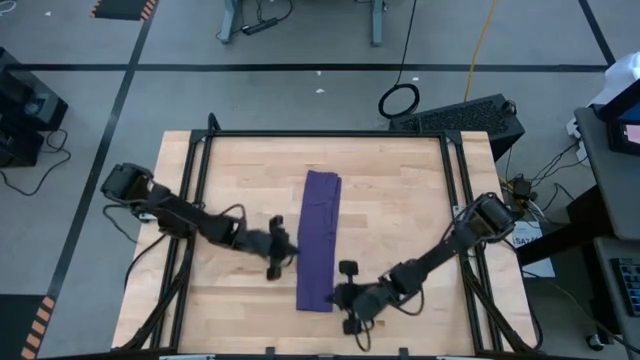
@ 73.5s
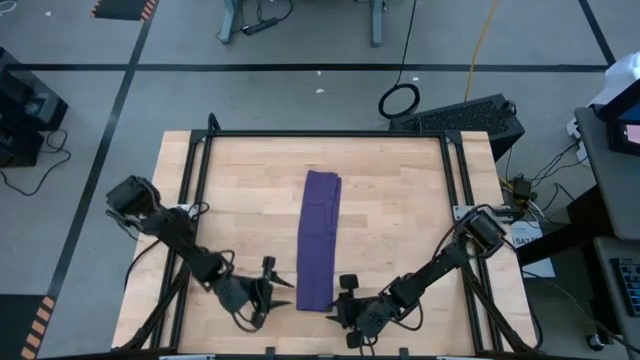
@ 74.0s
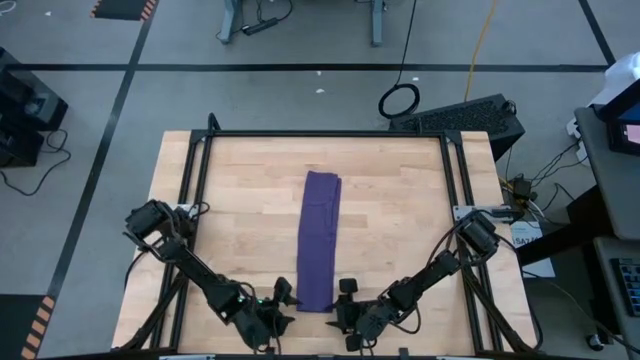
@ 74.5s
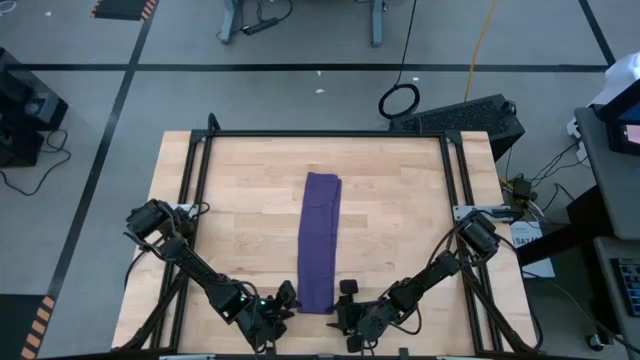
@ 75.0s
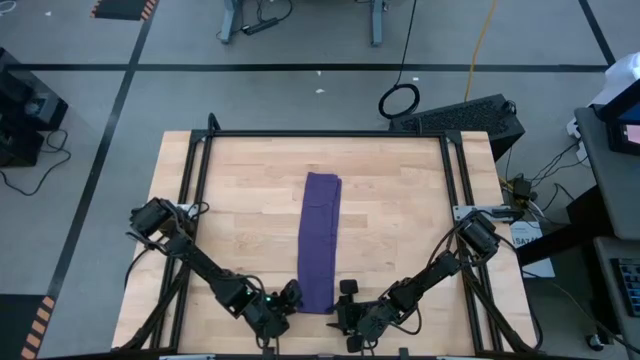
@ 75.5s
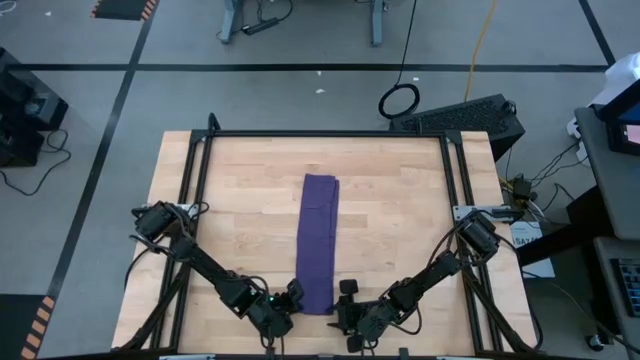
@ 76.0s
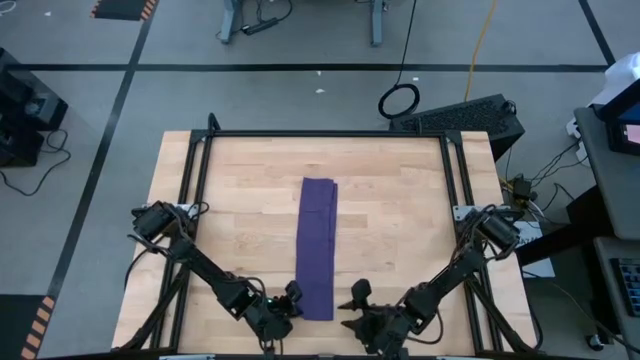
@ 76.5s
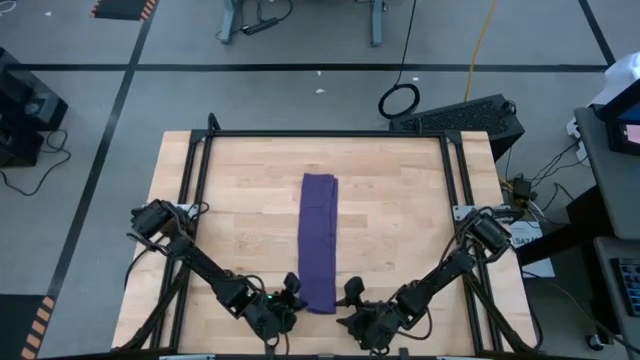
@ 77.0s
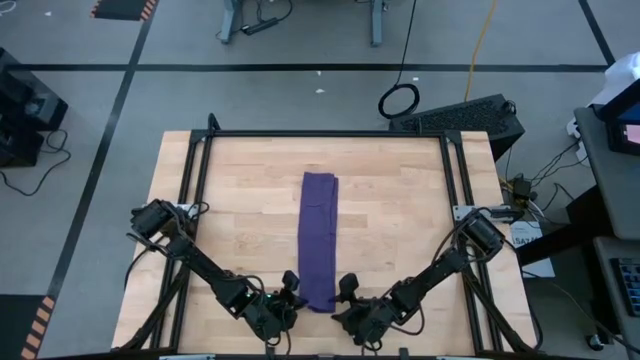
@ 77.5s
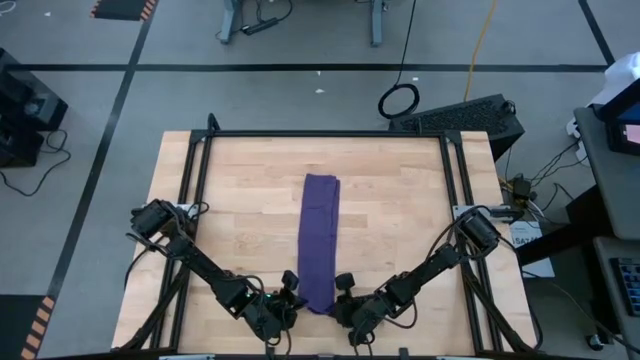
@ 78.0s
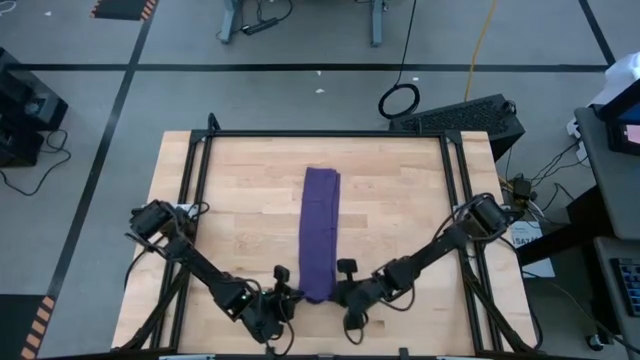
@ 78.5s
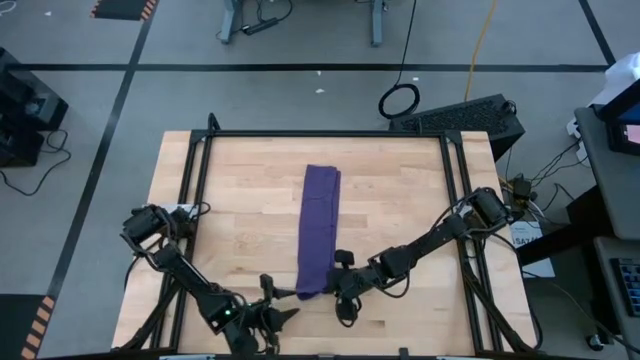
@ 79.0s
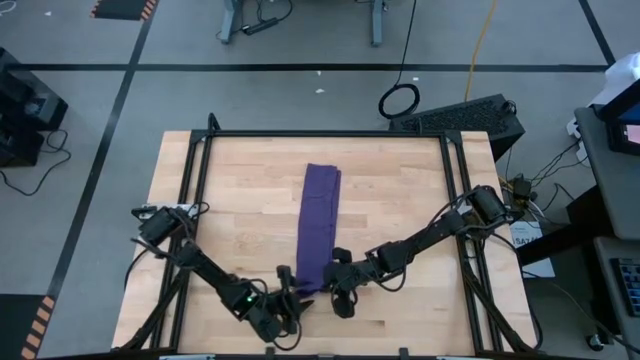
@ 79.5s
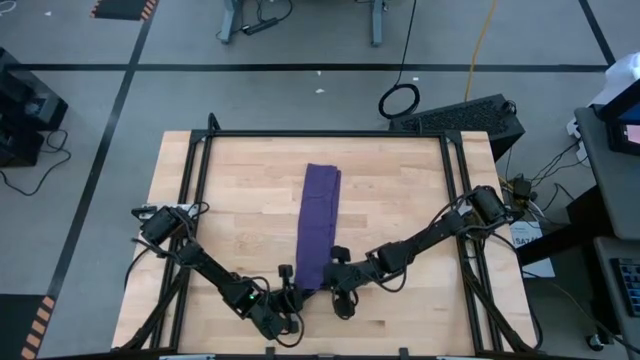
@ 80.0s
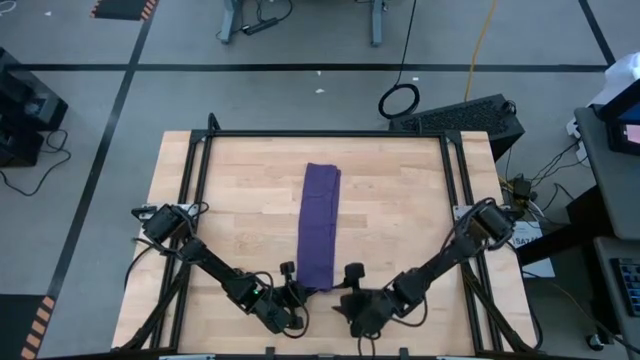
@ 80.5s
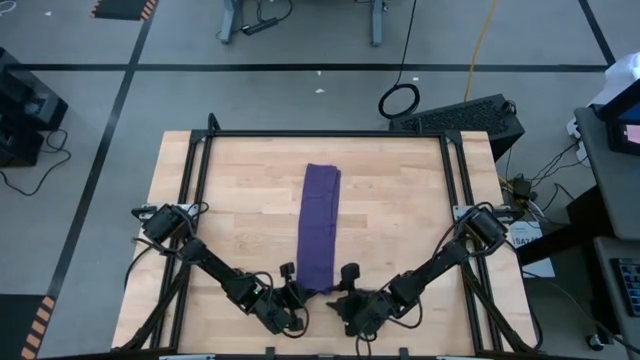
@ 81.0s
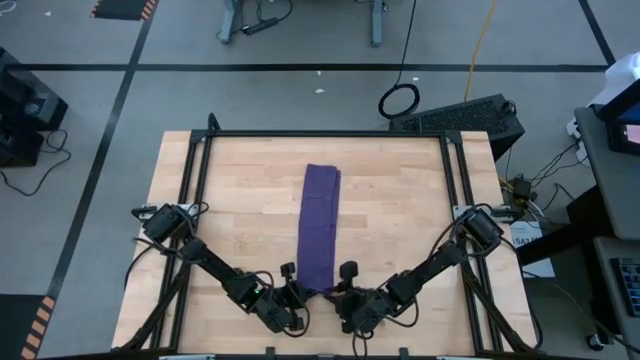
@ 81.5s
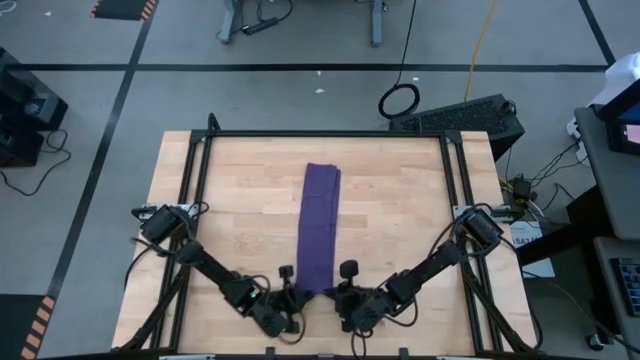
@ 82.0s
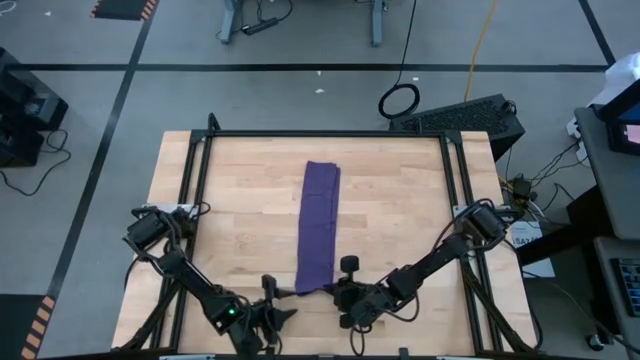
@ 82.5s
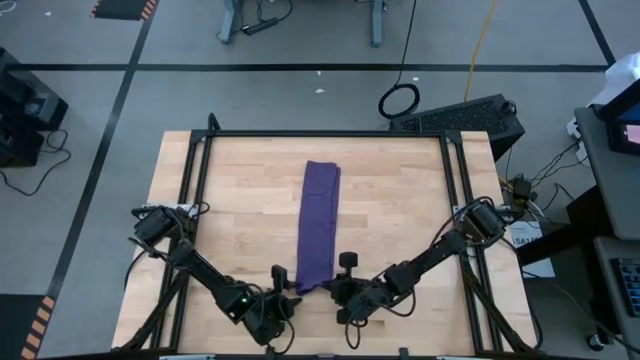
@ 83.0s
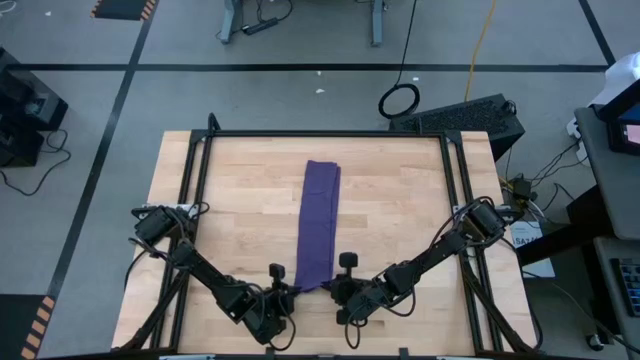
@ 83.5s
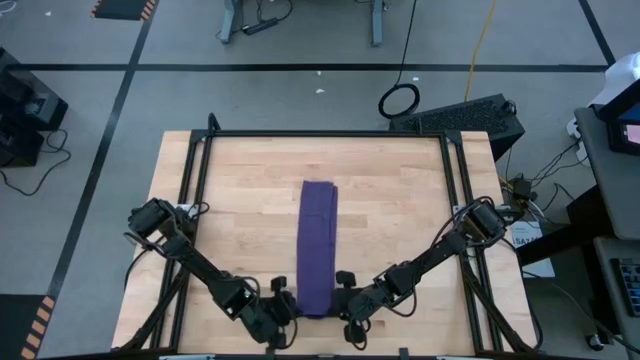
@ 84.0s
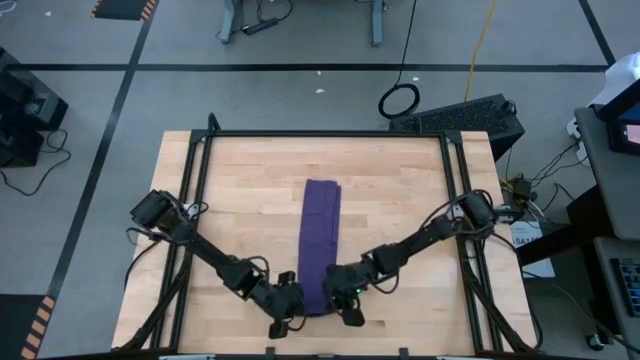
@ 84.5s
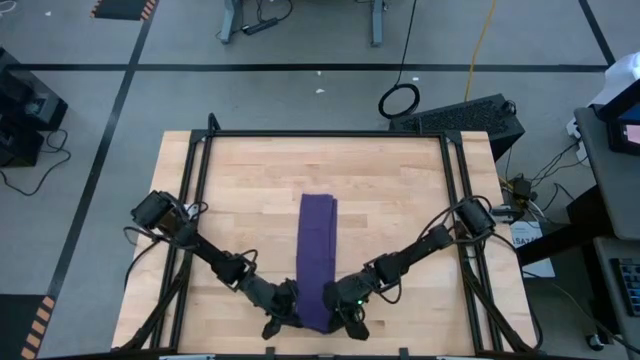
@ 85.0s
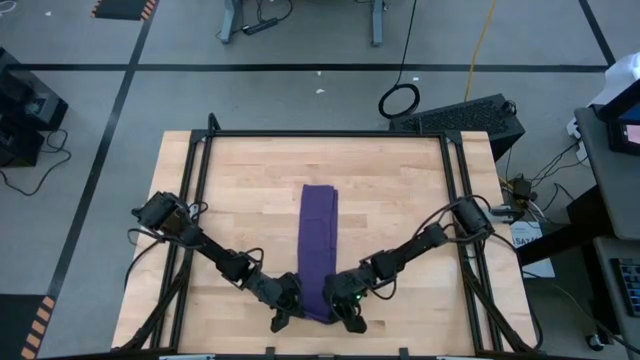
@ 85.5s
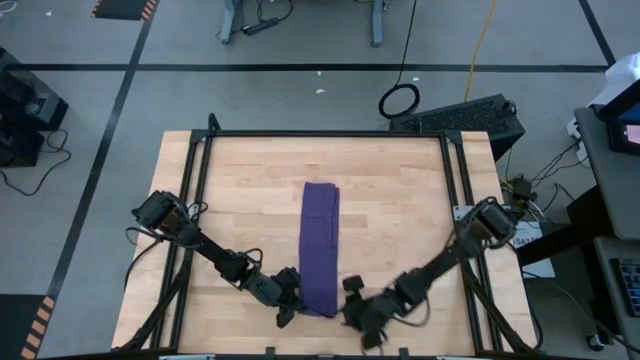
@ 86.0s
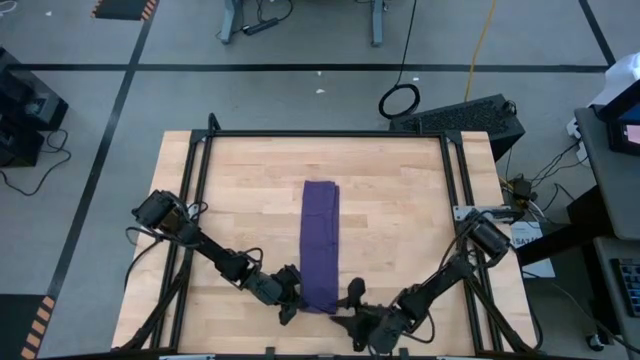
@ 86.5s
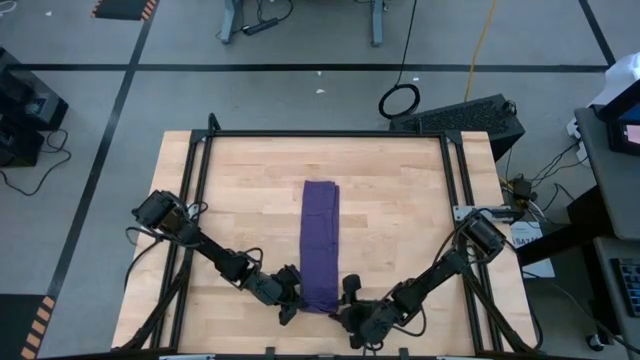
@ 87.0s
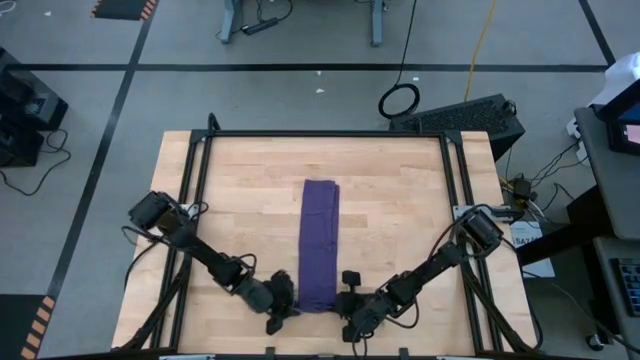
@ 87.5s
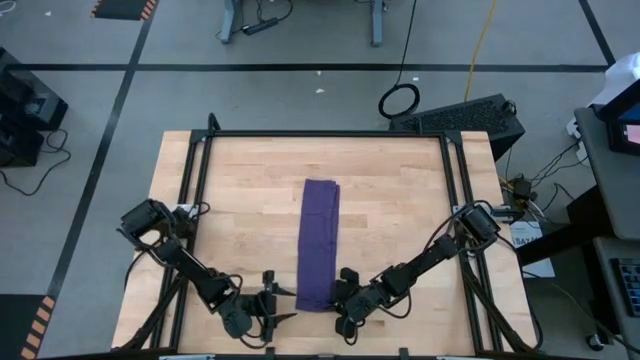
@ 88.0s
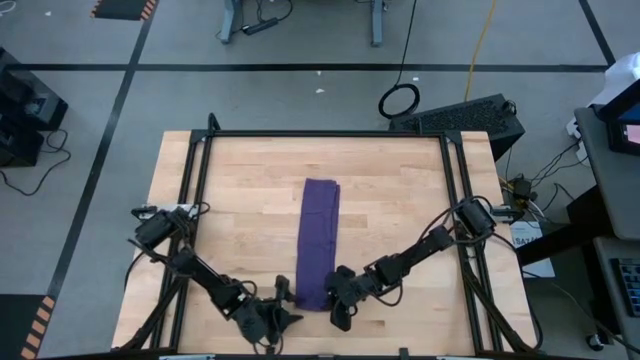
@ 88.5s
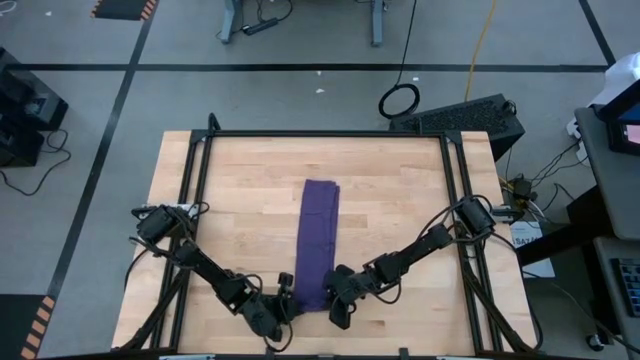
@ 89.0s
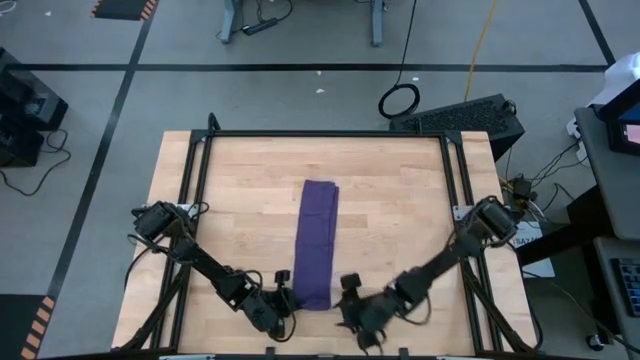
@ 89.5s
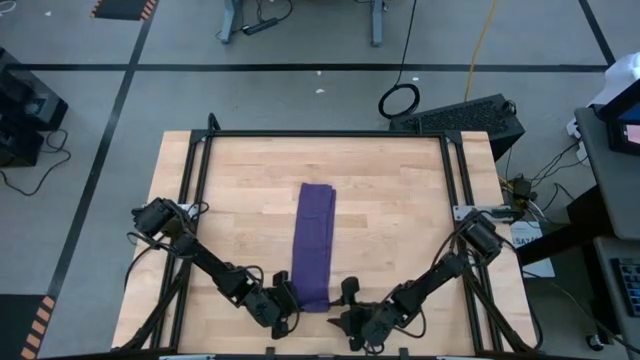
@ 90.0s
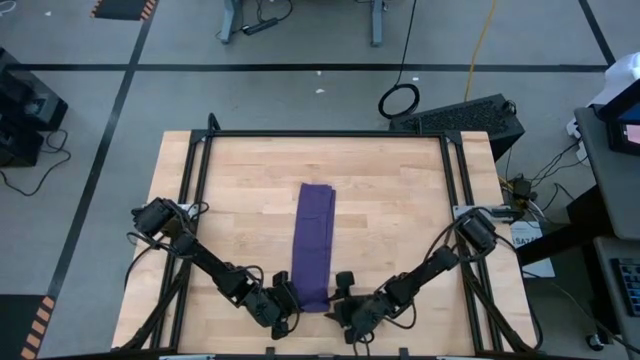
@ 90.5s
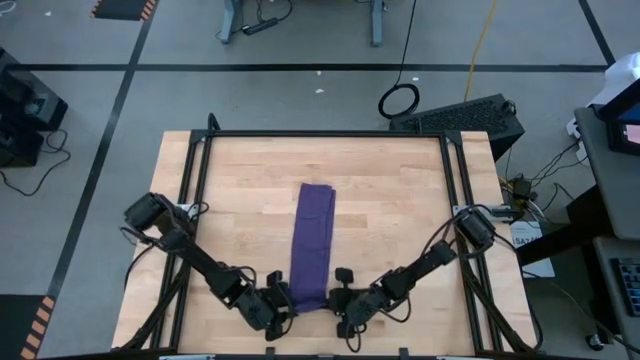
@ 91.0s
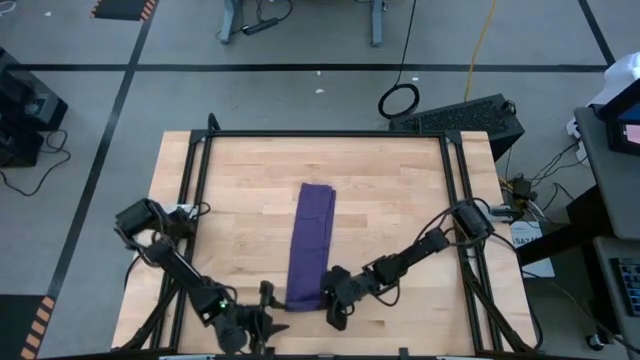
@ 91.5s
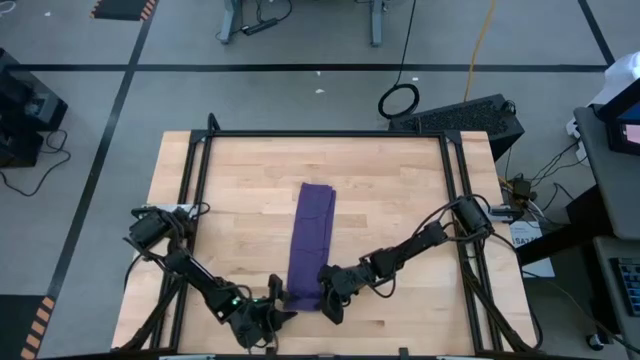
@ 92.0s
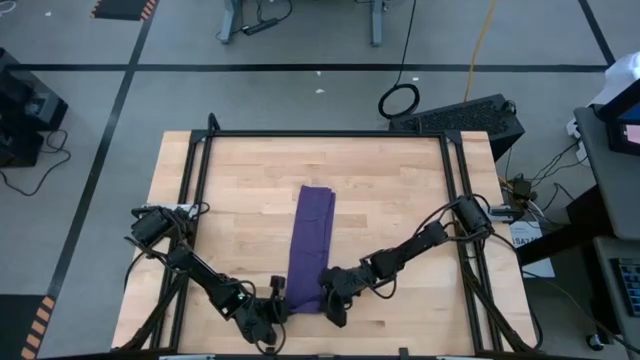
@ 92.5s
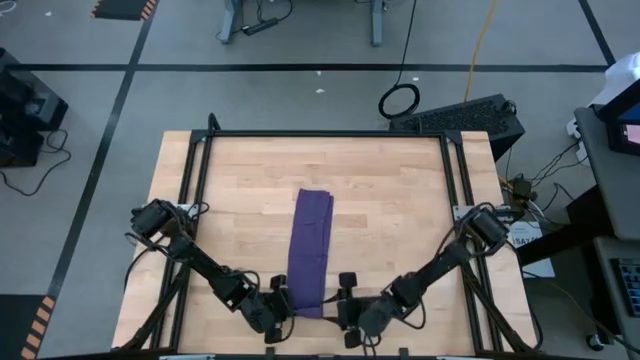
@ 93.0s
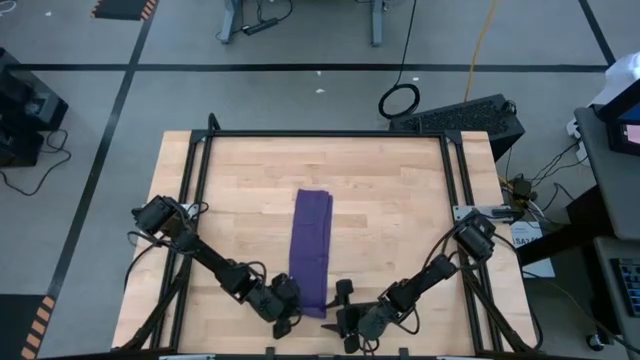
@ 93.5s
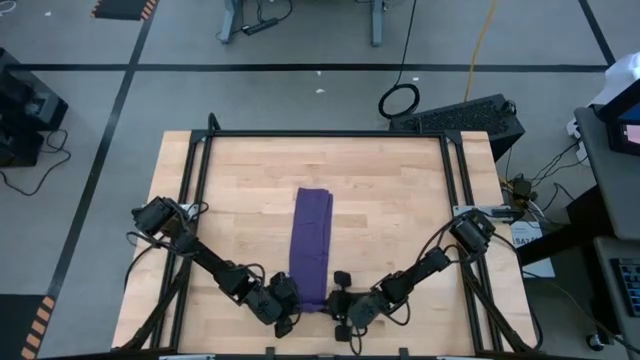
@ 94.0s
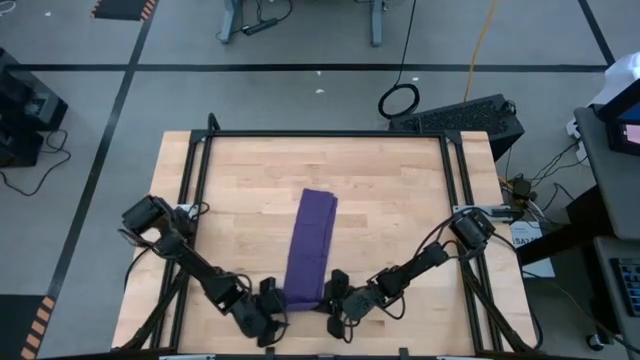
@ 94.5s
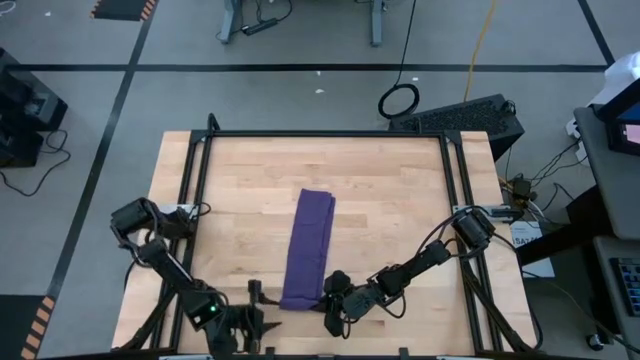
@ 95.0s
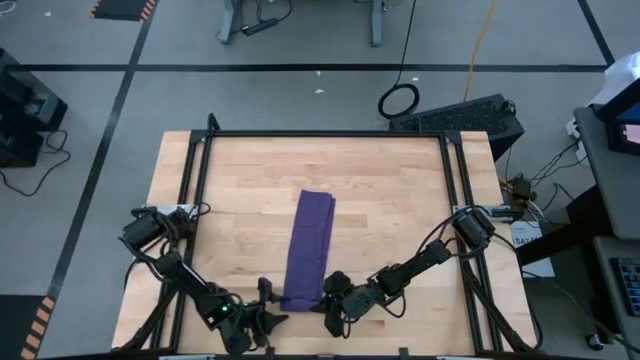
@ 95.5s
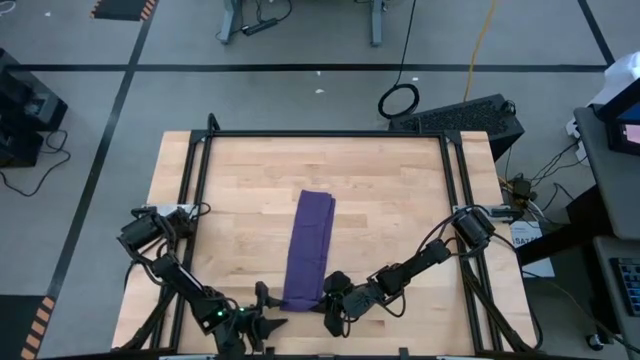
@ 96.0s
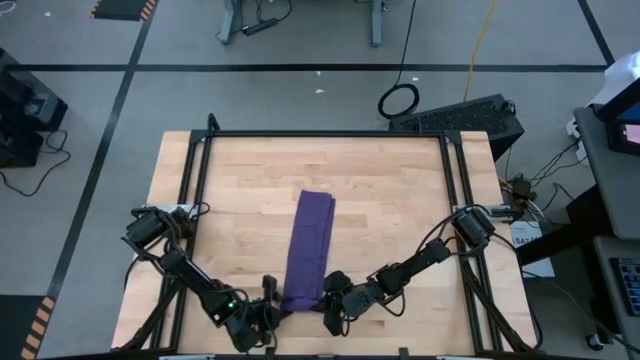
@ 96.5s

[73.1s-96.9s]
Task: Roll towel into tight, uniform cylinder
Roll the purple towel on the table
